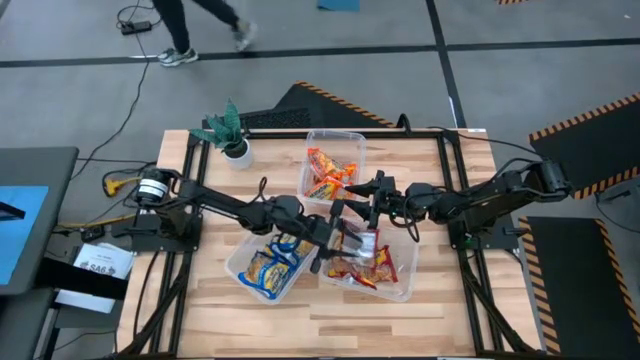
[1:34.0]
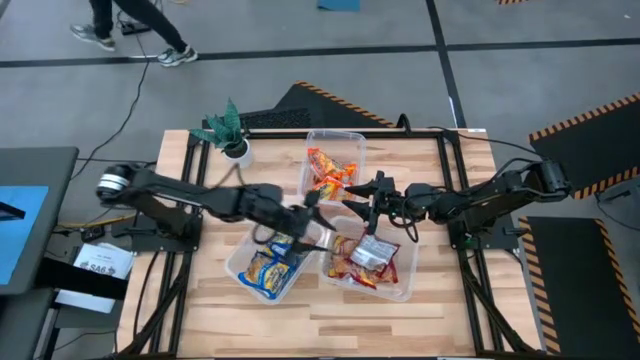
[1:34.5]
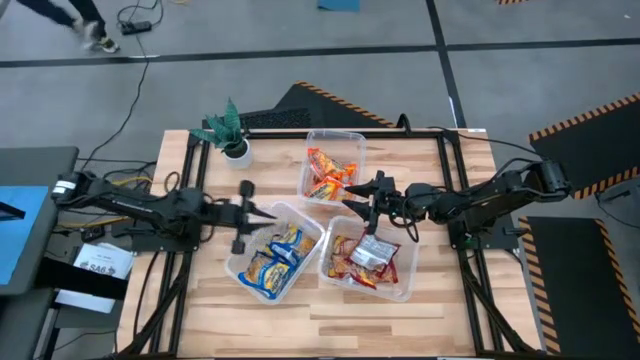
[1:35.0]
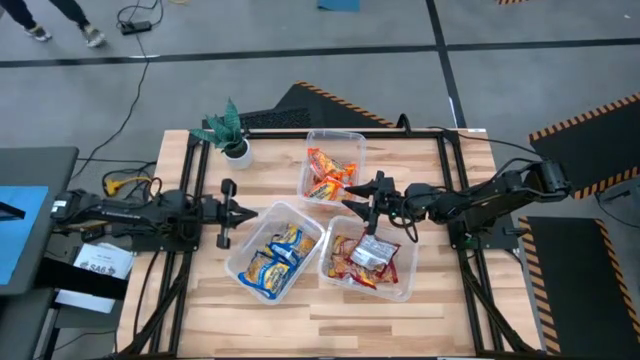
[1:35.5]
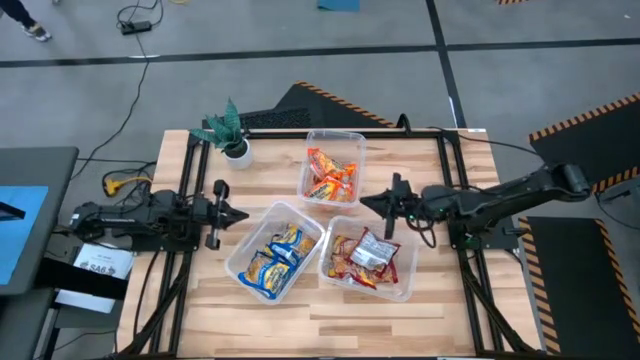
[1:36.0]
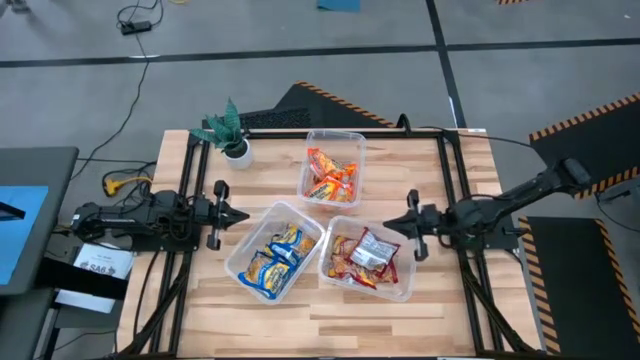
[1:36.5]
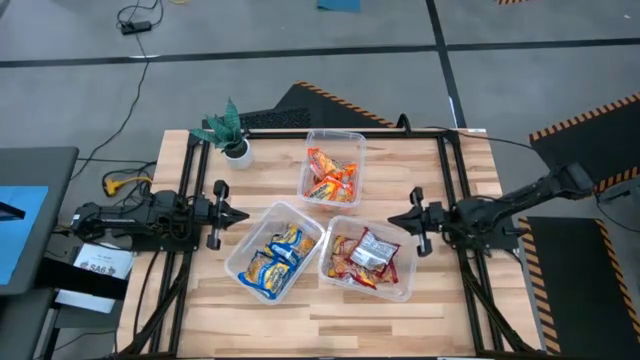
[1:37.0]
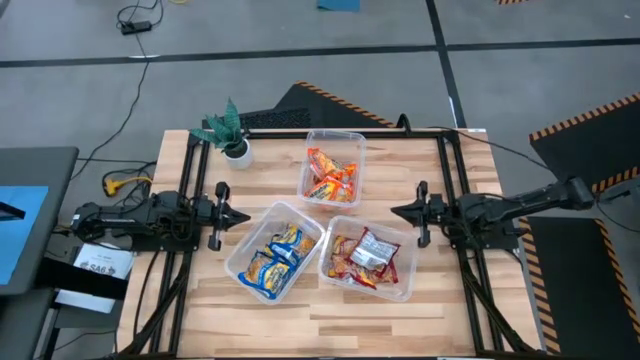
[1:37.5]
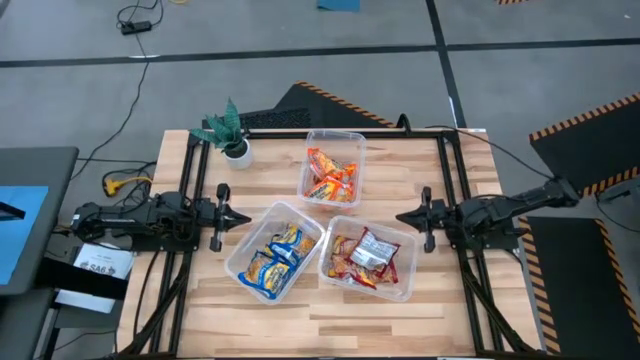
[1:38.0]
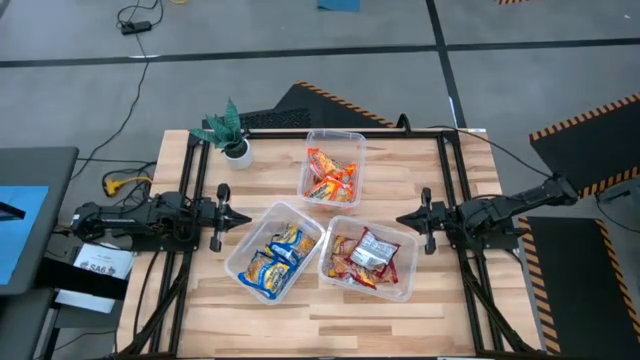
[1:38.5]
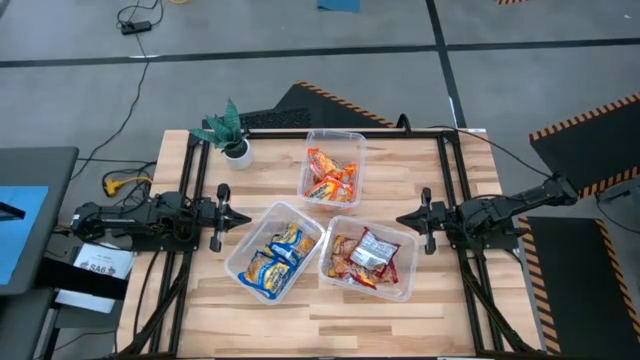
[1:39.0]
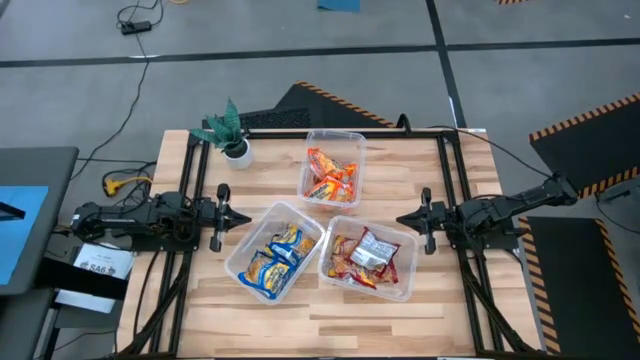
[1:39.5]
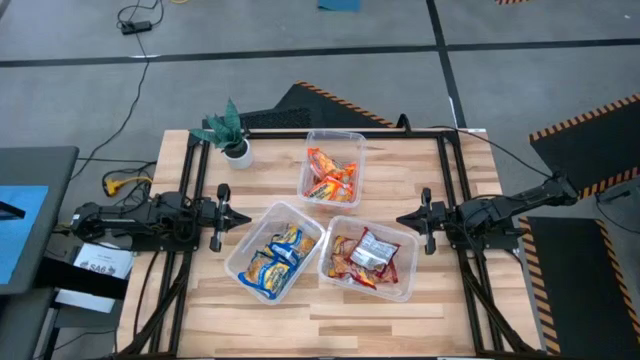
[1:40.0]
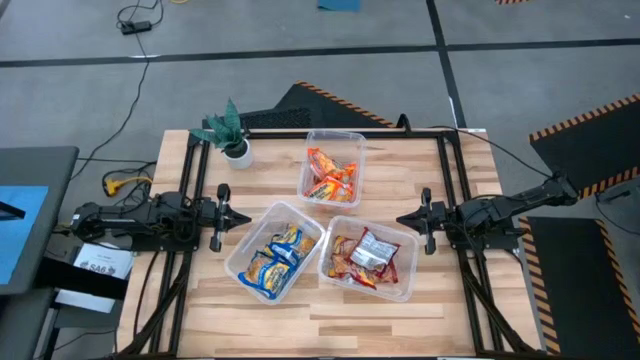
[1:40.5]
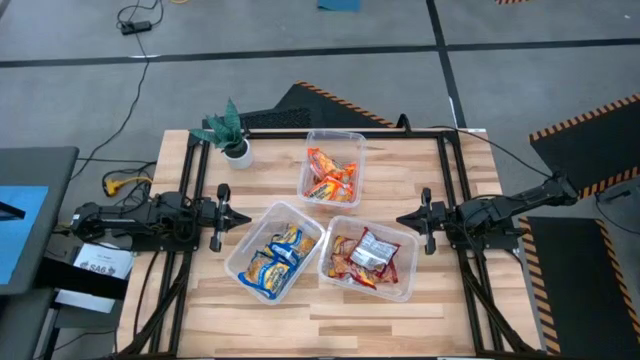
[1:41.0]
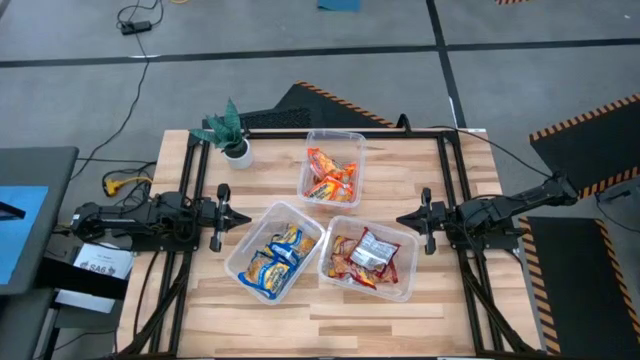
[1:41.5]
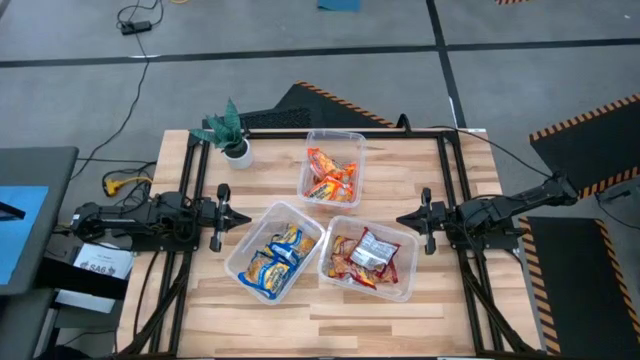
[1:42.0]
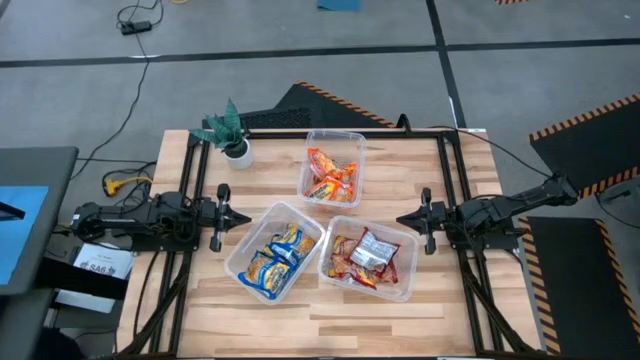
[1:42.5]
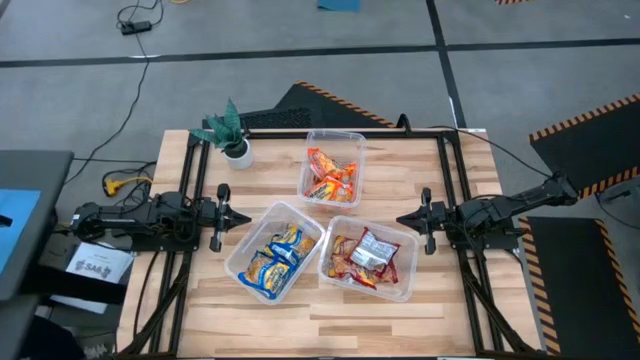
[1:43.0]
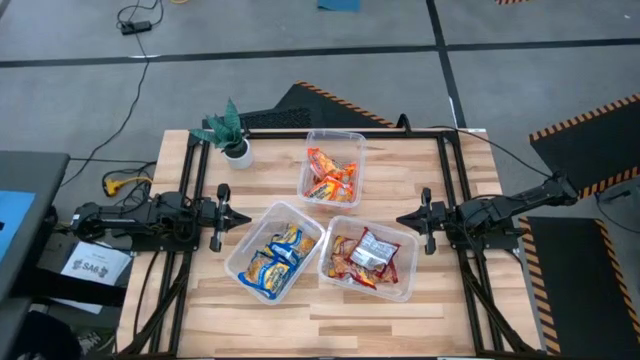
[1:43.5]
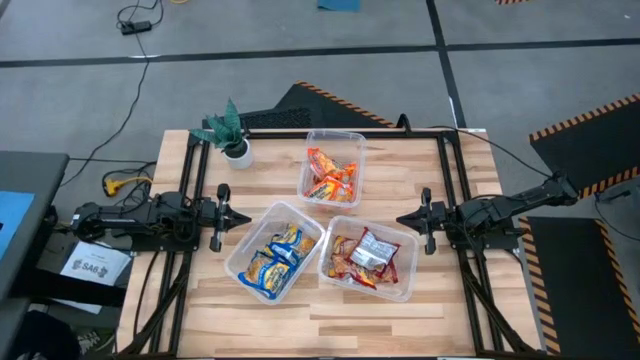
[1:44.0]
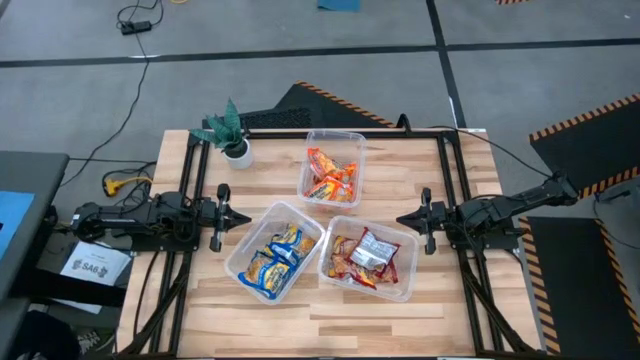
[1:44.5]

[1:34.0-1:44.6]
Task: Sort Maruchan noodles
Return to Home Position

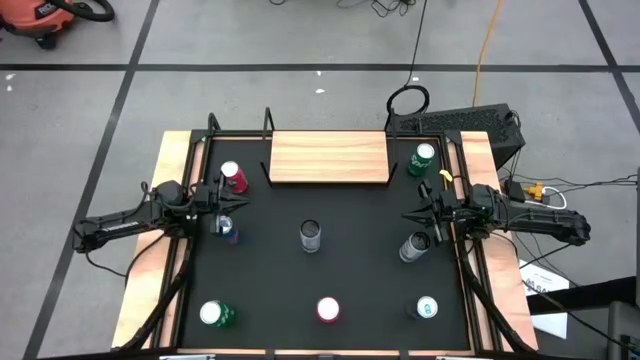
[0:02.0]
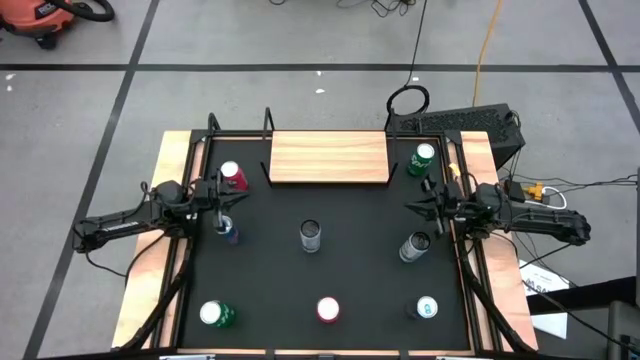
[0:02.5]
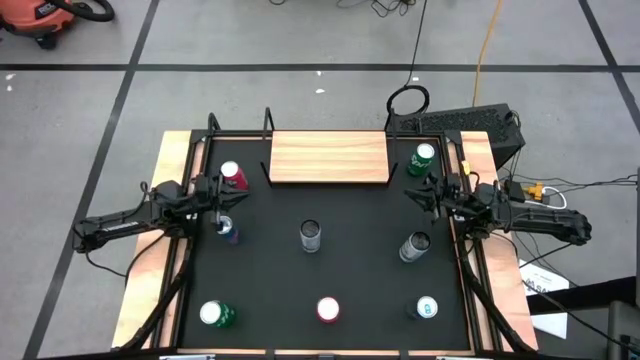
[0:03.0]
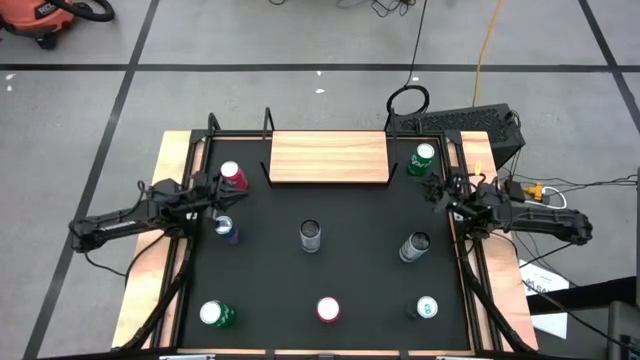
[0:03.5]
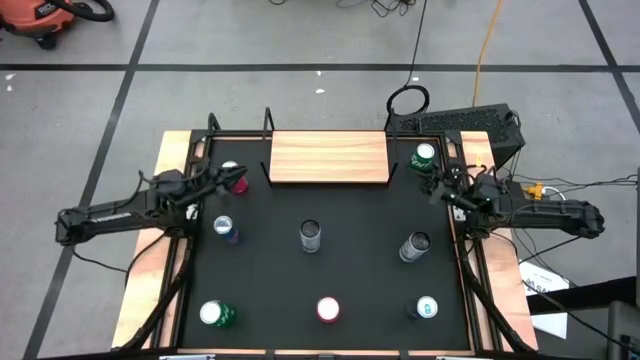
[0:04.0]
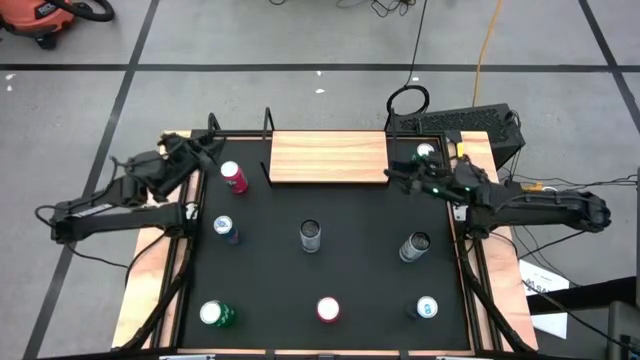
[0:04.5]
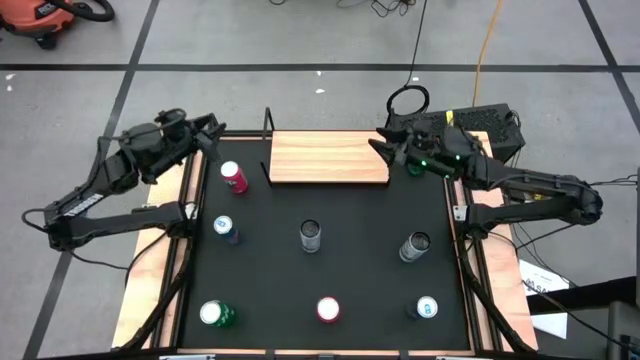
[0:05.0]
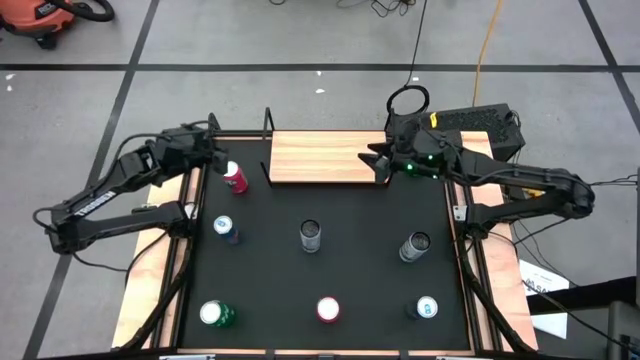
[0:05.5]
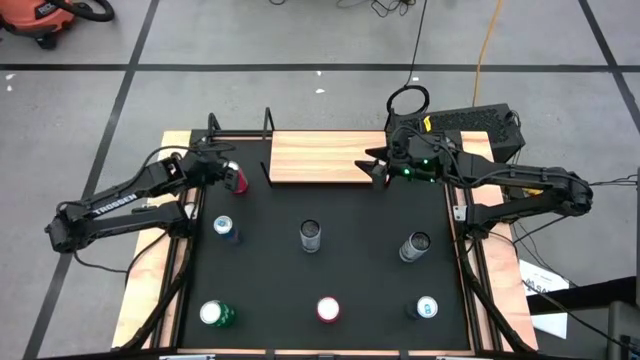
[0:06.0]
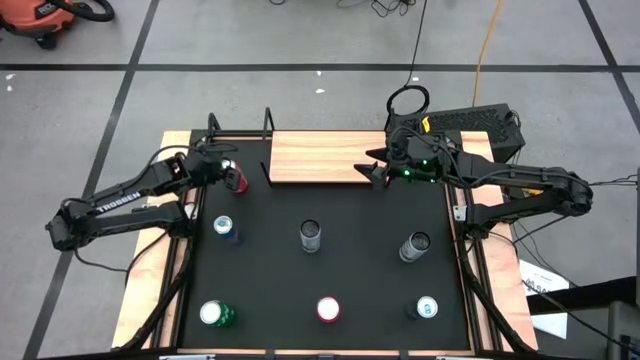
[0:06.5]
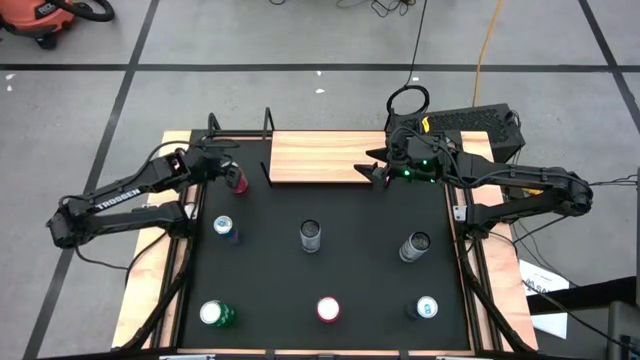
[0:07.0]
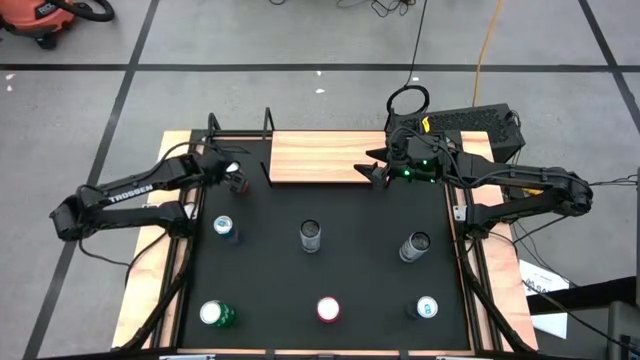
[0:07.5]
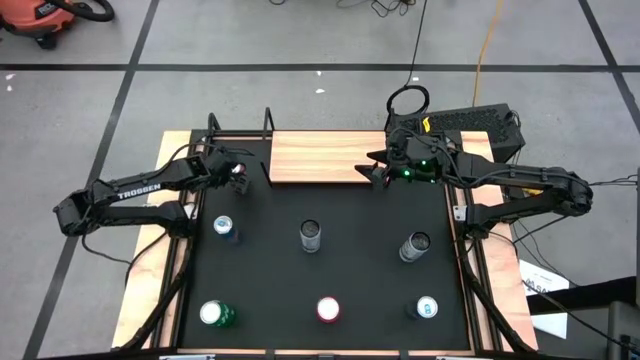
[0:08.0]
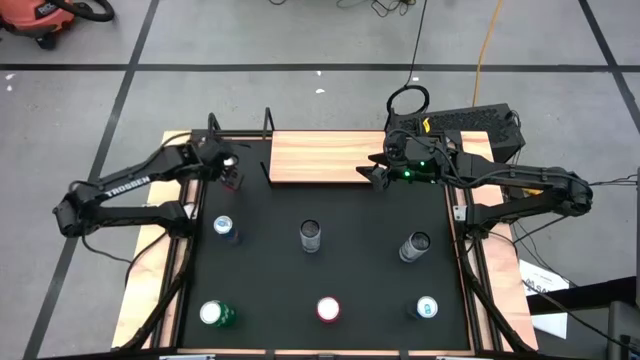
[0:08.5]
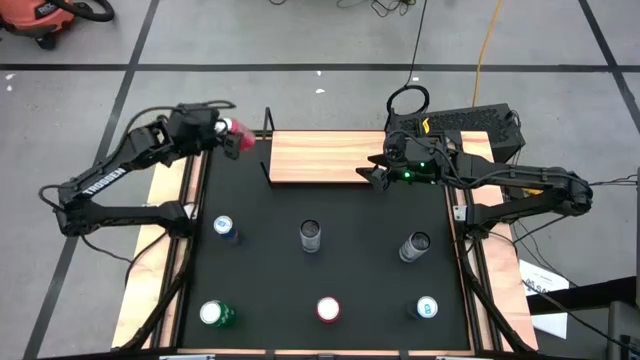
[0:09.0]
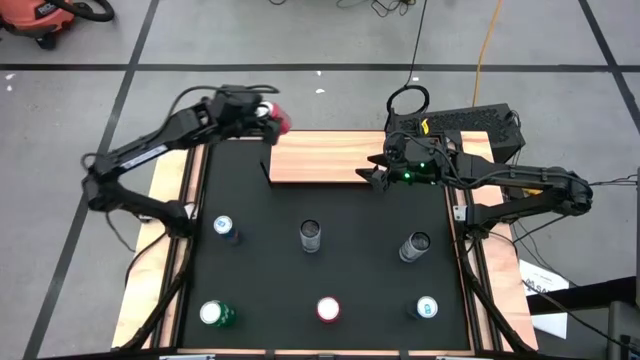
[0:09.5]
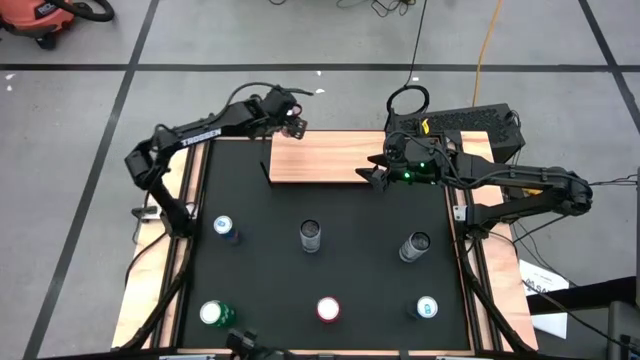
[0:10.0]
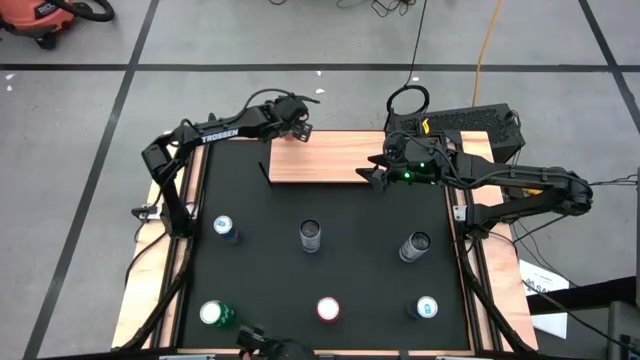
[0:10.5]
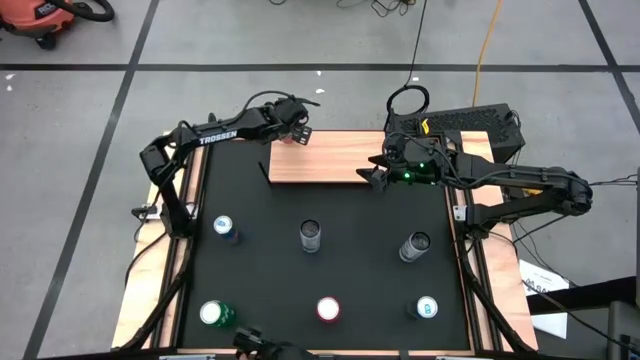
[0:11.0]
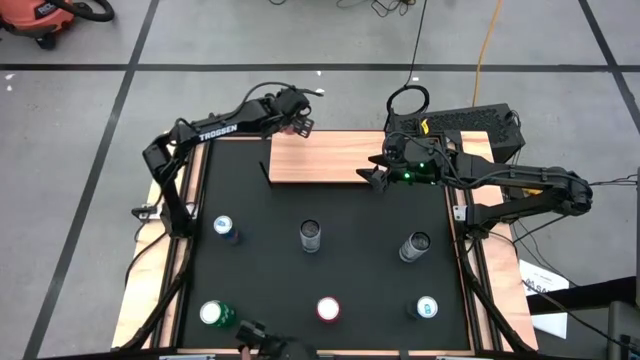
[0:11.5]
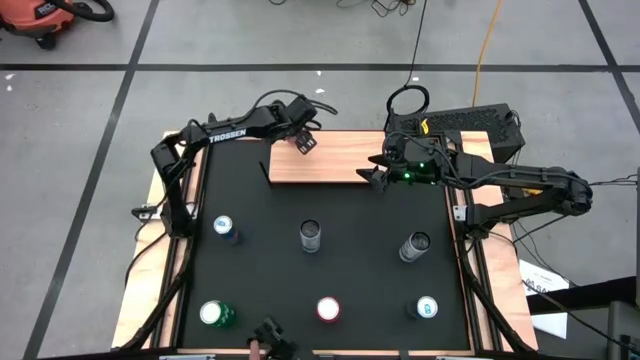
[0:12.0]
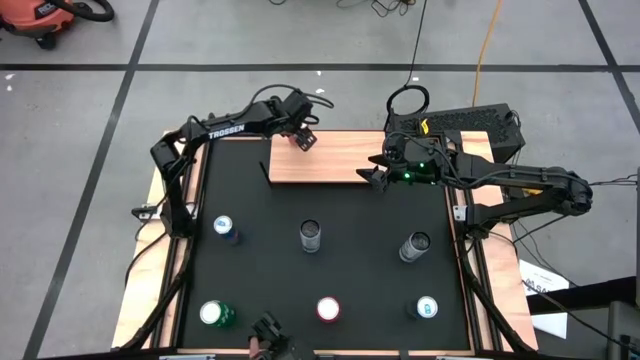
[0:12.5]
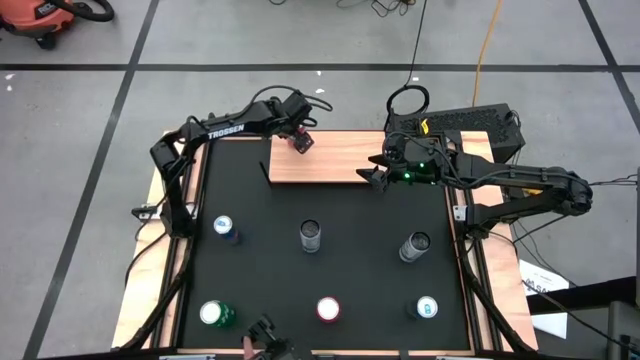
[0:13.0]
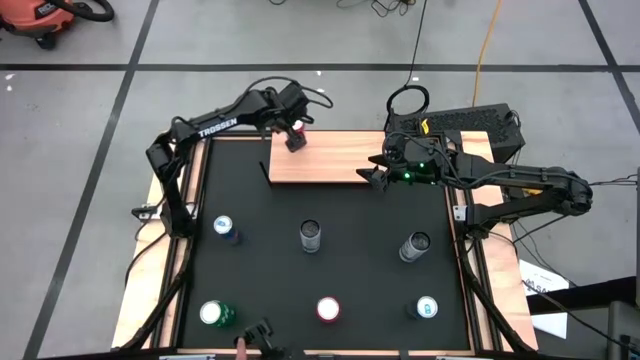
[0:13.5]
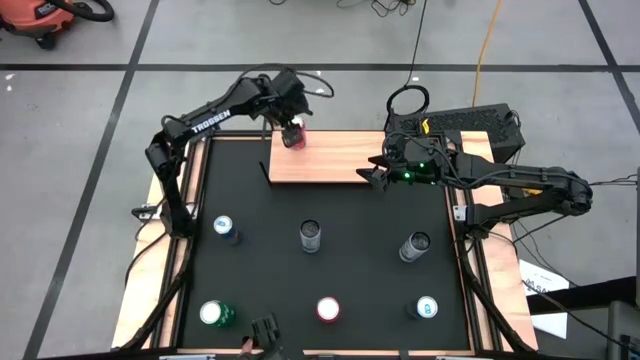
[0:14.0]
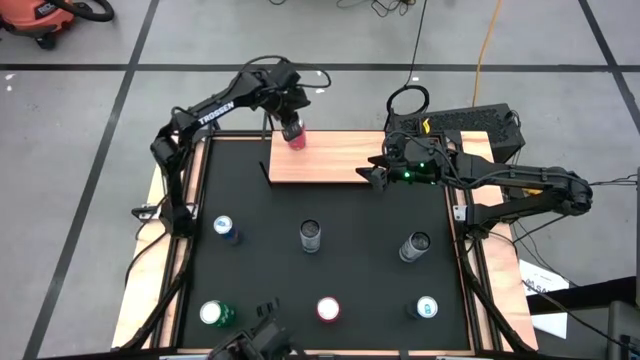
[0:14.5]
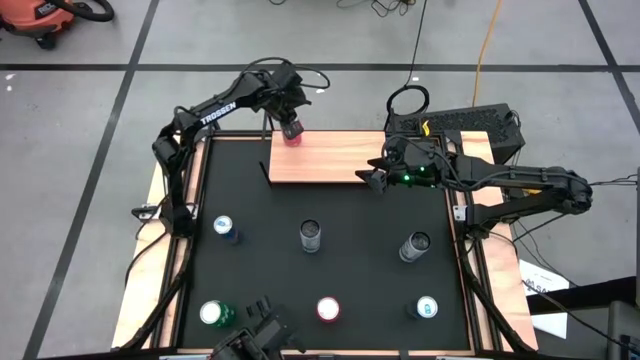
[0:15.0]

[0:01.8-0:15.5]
Task: Place canned beverage on shelf
Put the top red soda can on the shelf
